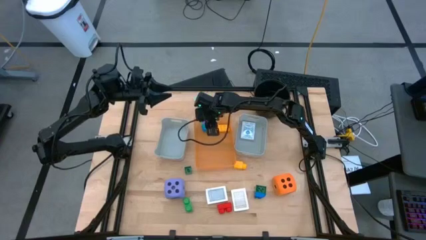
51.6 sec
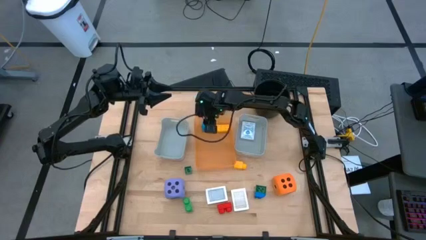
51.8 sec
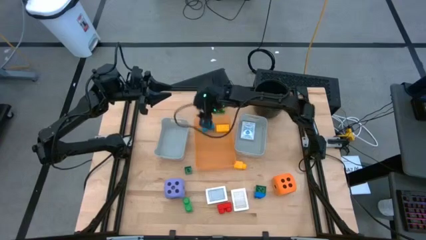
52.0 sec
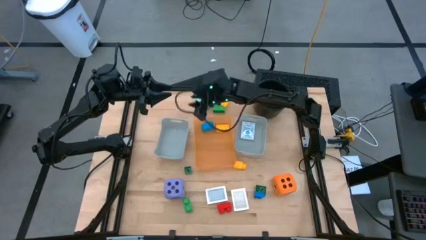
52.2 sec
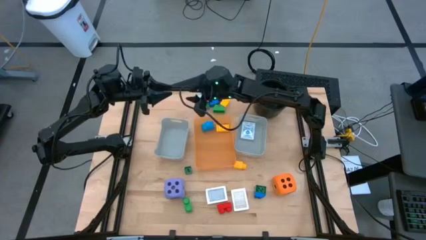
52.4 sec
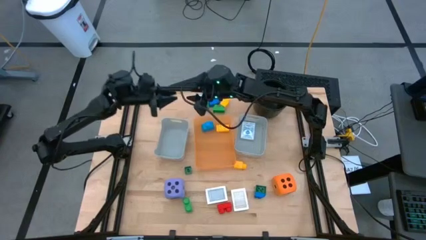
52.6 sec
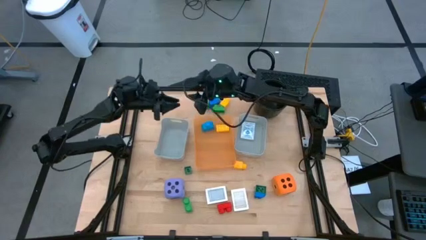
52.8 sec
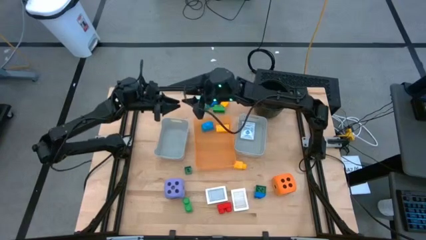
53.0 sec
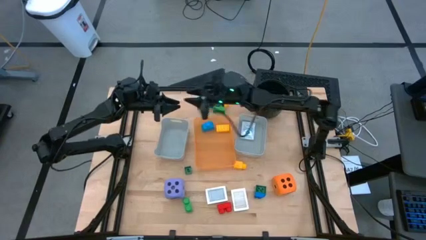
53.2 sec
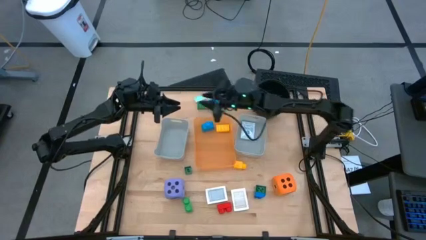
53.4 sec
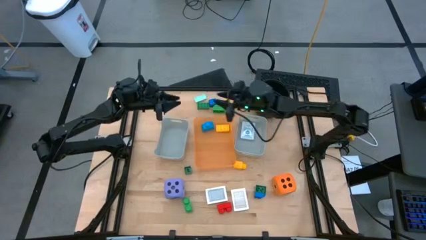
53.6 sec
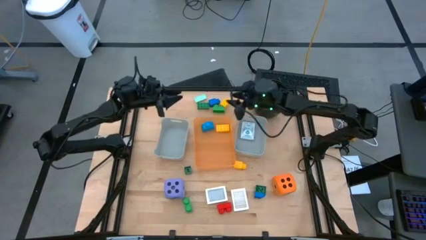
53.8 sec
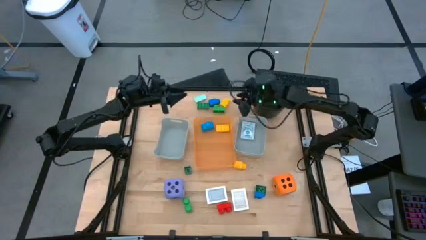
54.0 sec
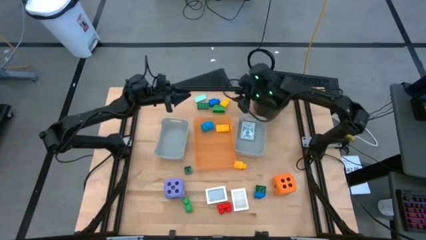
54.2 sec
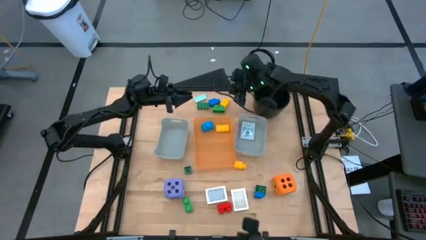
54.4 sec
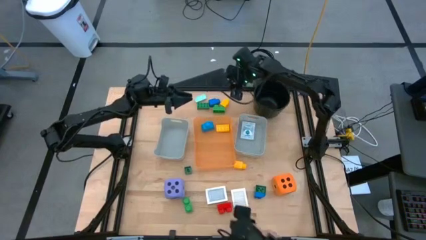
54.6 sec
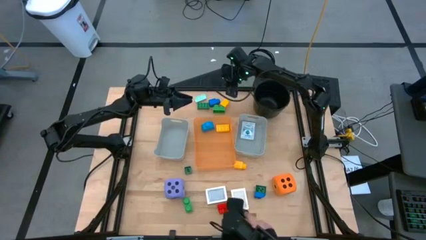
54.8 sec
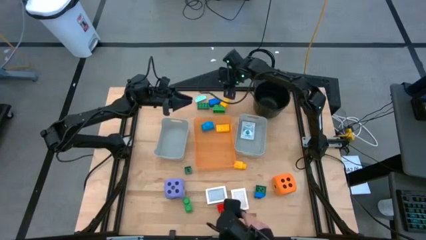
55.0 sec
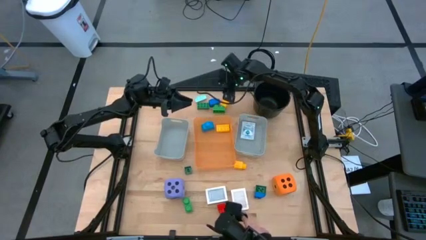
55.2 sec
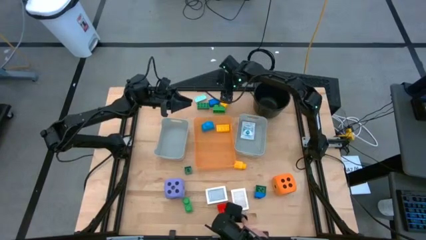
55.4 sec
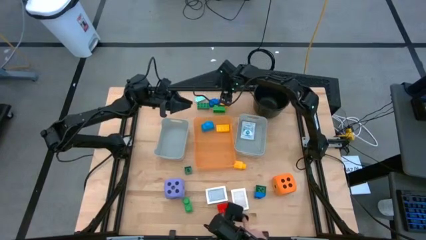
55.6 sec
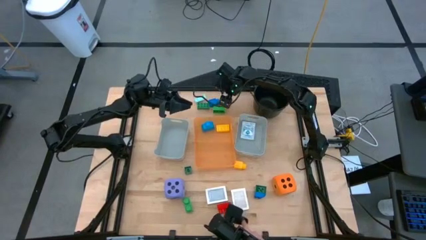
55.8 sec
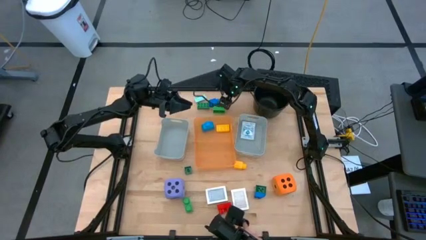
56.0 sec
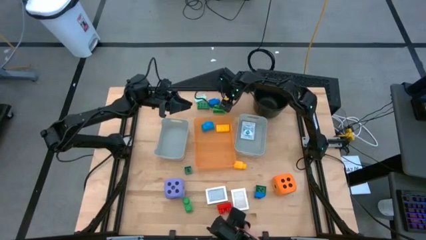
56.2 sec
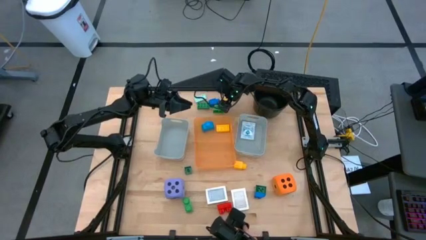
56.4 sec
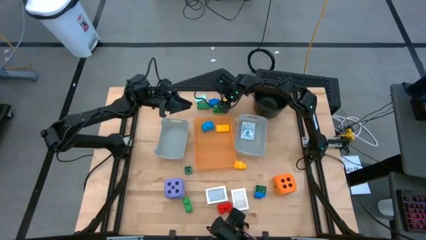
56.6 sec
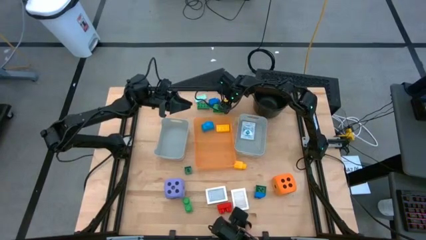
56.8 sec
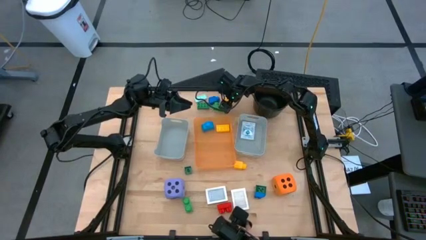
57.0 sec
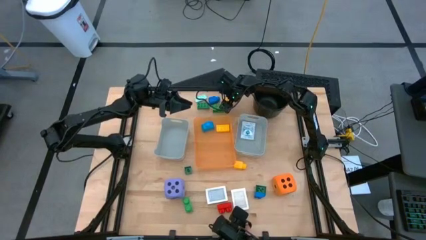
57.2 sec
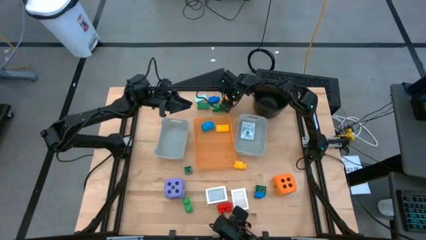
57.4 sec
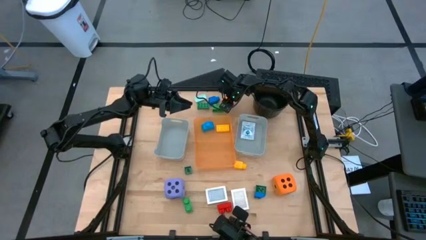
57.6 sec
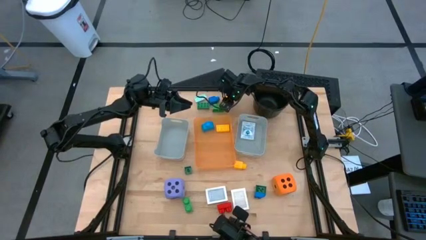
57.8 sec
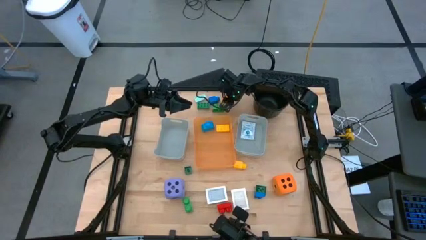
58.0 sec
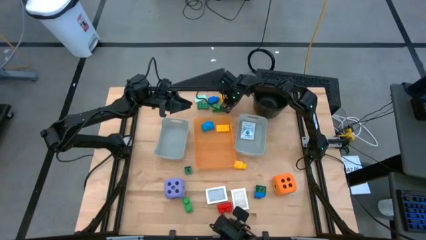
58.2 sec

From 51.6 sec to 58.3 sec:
Task: Pick & Place Toys
Put the yellow game piece into the orange bin

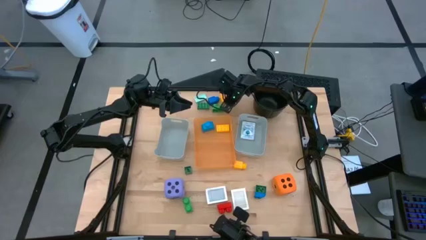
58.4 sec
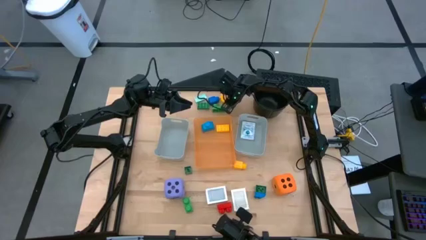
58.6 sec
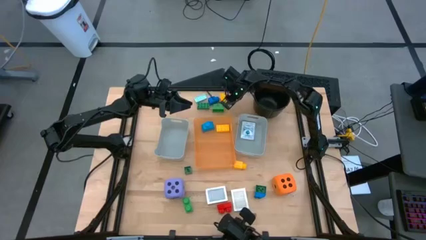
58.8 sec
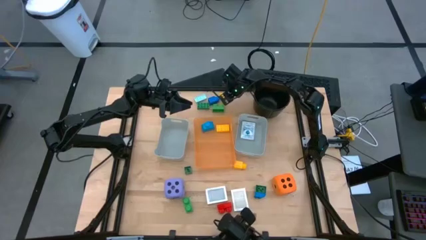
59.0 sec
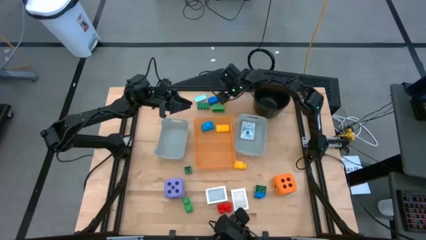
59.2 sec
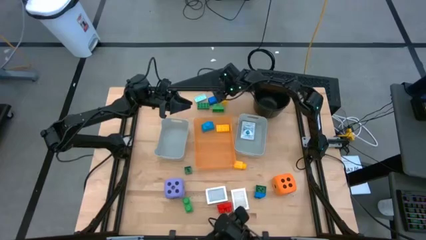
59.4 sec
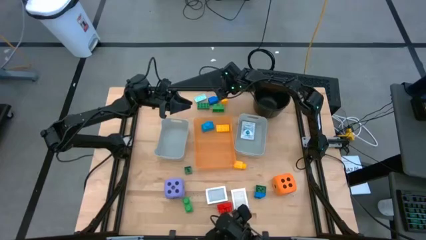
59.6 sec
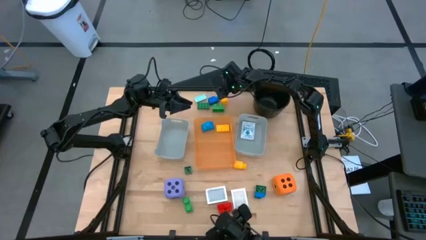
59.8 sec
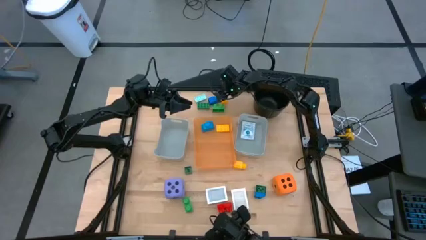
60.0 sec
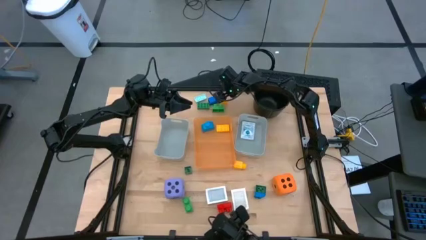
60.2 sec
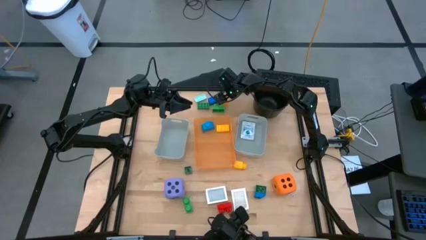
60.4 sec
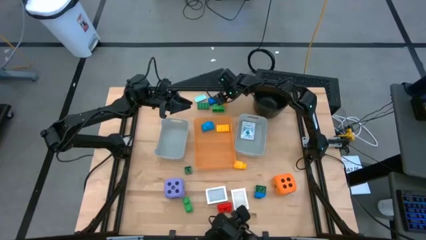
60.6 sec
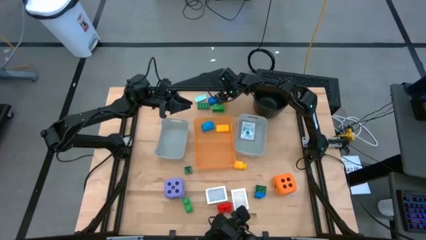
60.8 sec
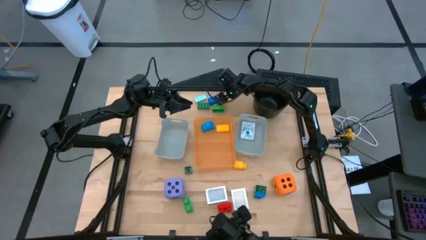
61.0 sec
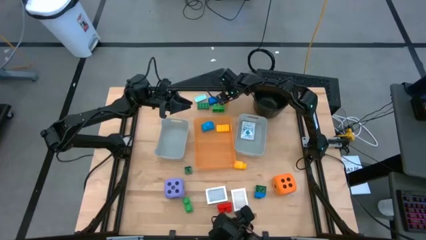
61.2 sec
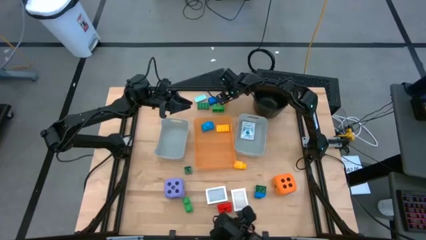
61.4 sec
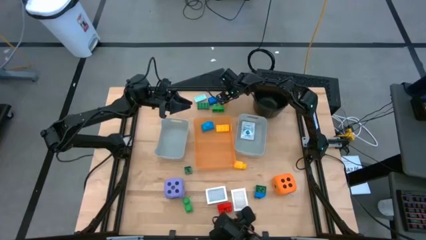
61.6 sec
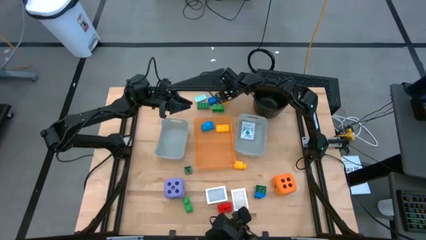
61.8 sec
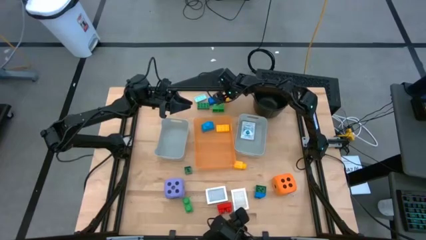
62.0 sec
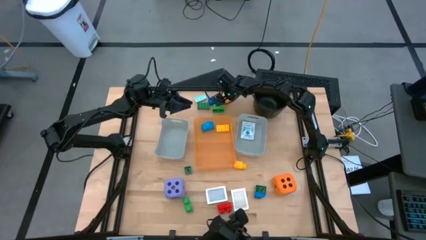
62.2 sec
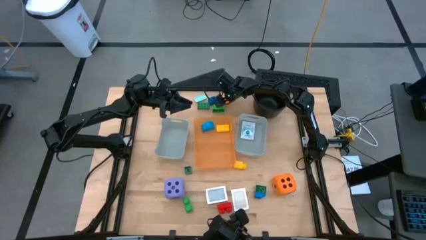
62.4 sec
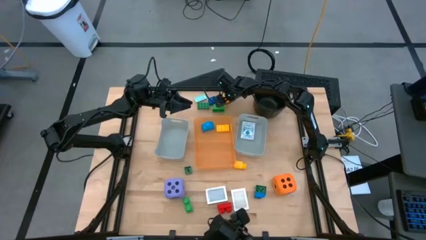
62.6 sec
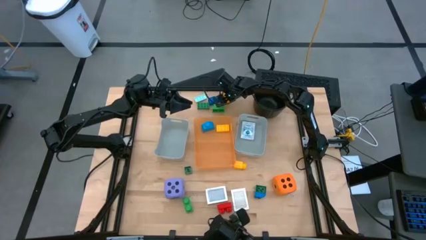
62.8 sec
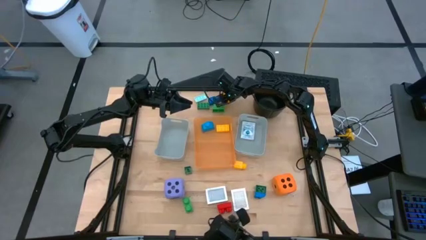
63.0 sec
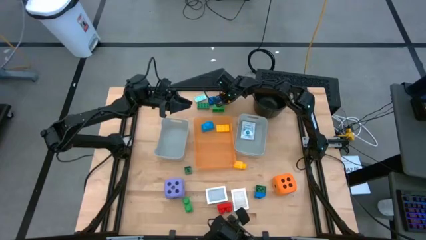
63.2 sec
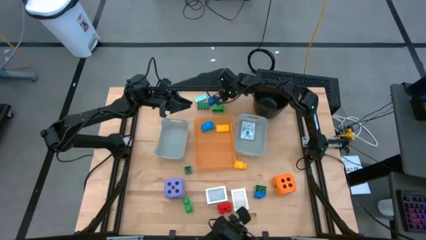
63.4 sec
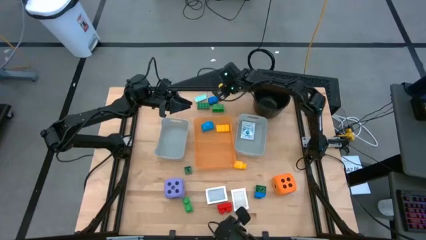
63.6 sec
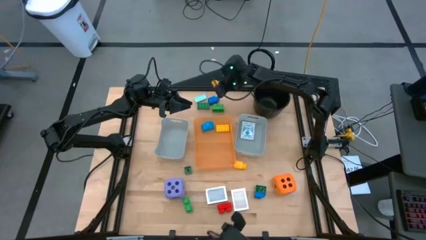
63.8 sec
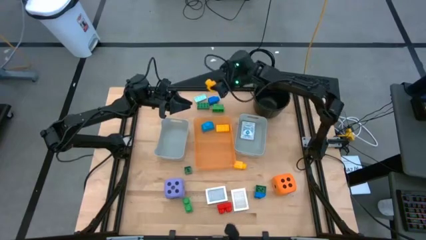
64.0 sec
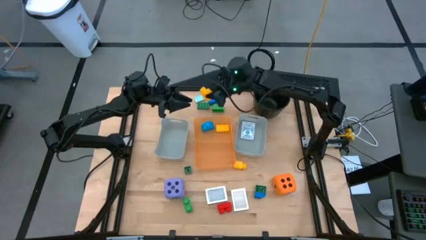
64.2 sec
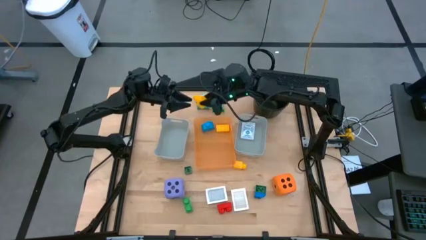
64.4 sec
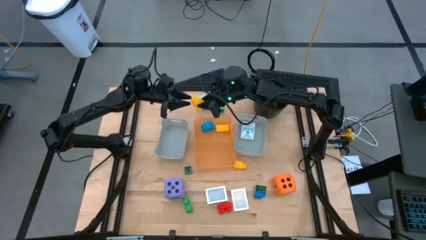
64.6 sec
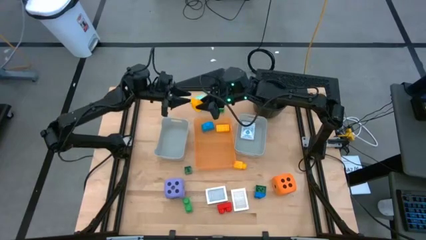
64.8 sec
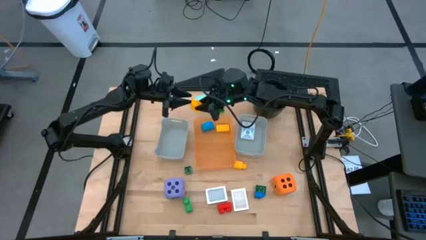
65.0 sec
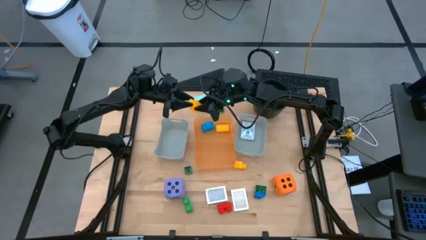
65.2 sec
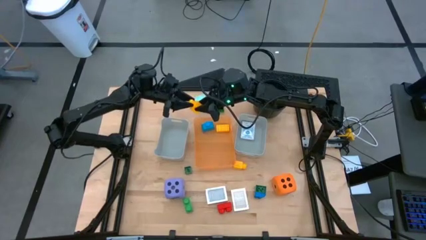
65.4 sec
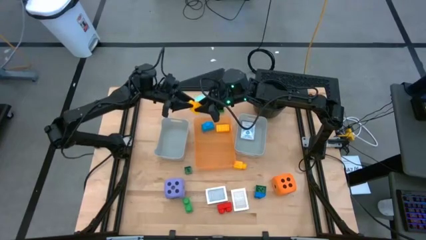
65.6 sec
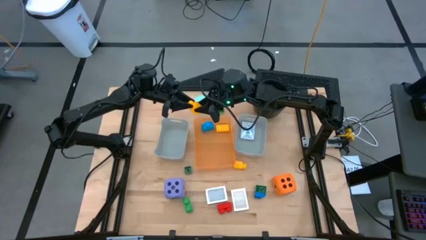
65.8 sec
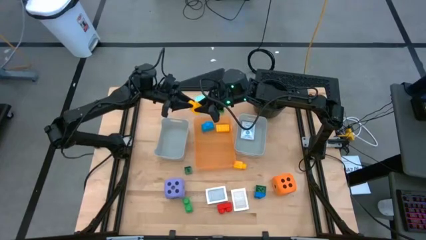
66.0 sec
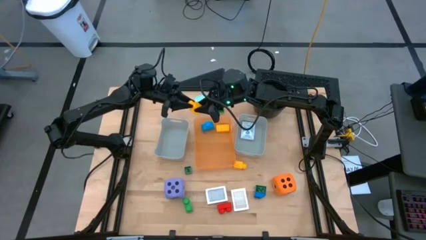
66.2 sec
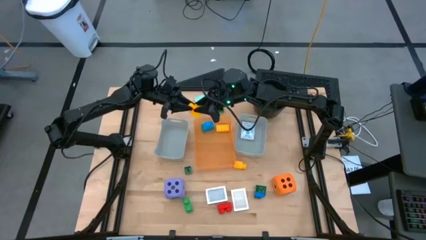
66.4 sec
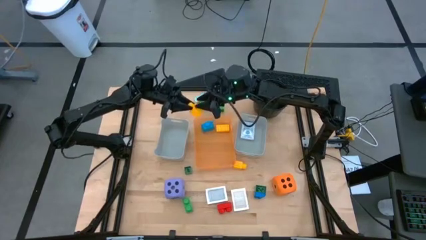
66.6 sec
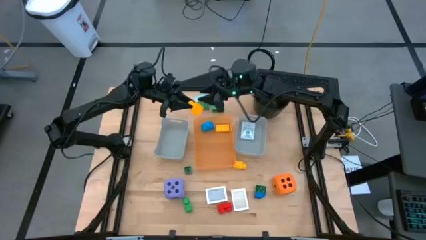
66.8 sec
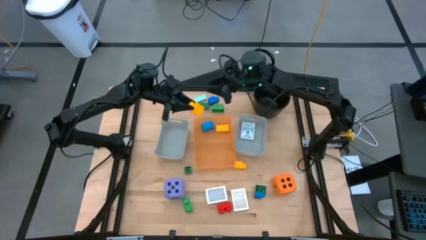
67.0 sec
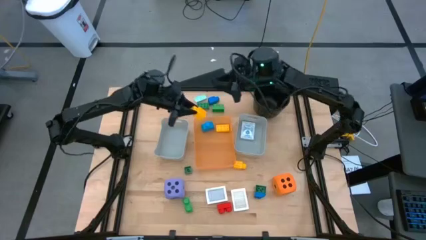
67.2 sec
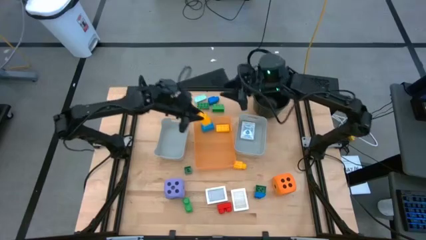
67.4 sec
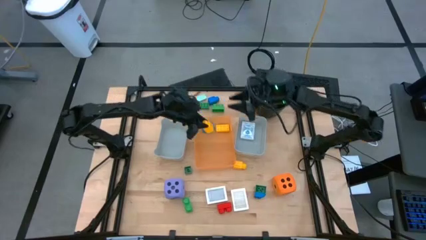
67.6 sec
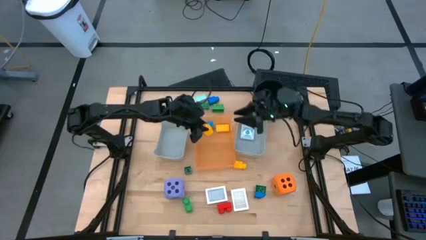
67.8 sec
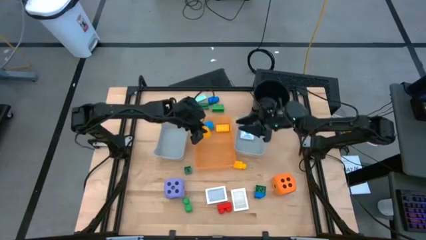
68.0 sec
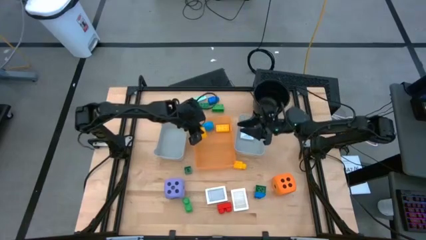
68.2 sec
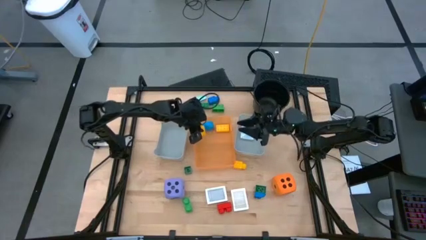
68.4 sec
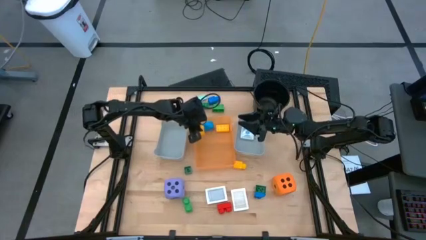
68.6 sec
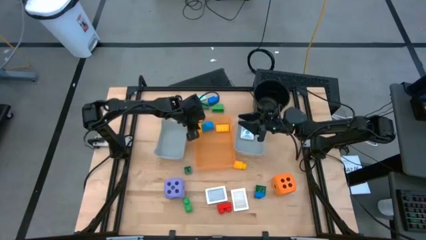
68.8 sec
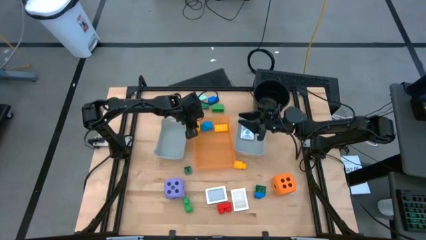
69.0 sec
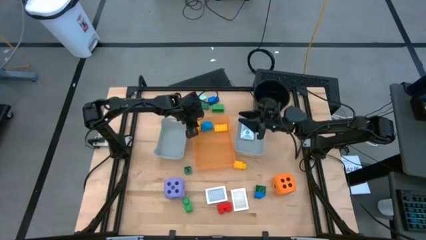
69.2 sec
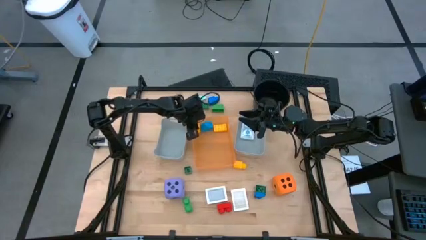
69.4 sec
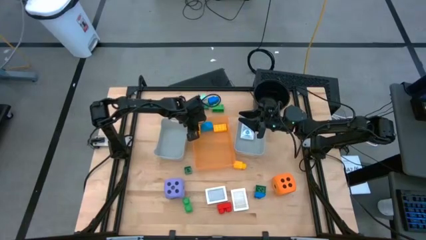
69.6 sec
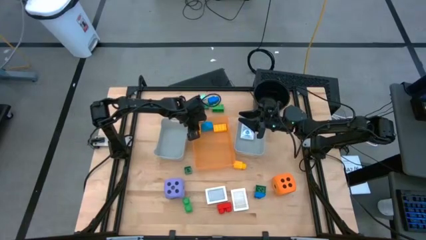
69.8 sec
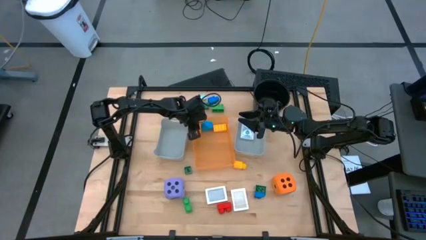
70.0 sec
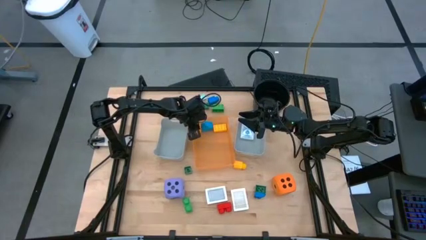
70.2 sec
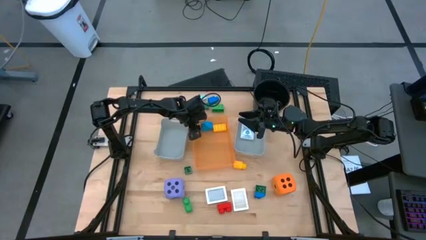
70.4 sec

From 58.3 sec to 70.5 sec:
Put the yellow game piece block into the orange bin
